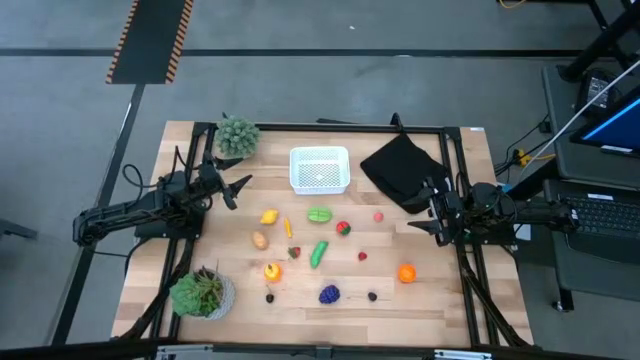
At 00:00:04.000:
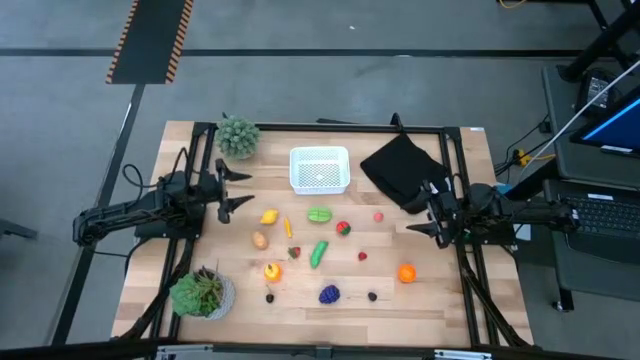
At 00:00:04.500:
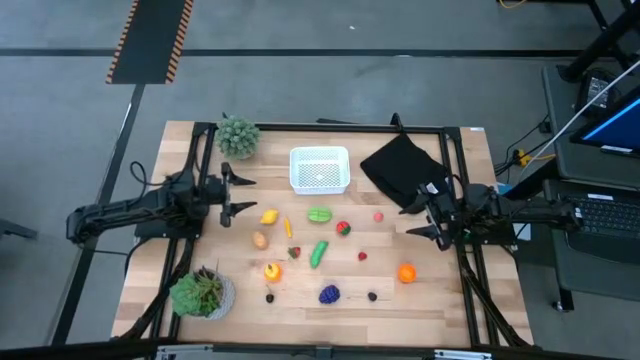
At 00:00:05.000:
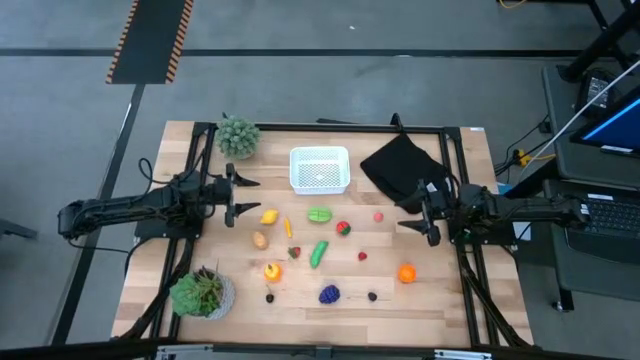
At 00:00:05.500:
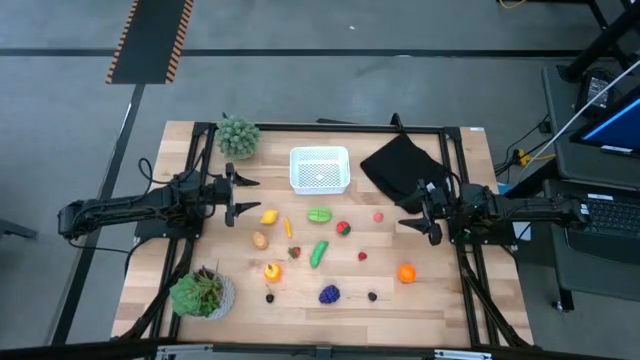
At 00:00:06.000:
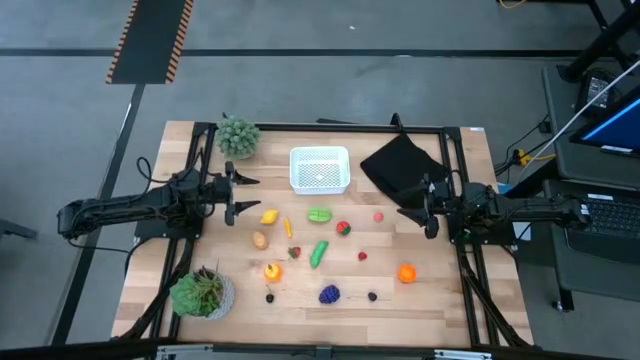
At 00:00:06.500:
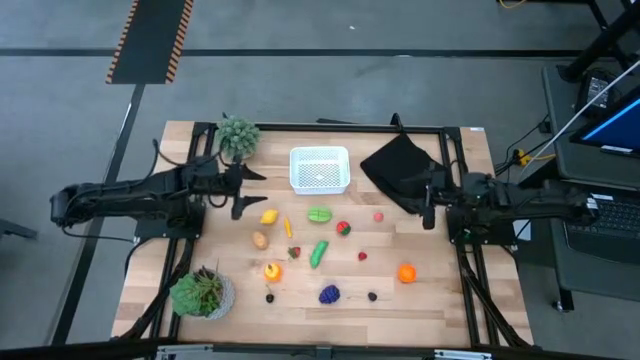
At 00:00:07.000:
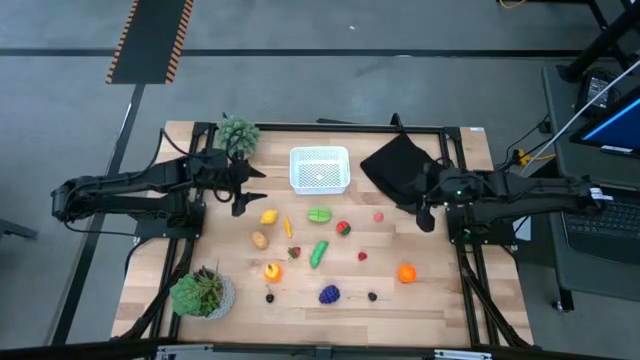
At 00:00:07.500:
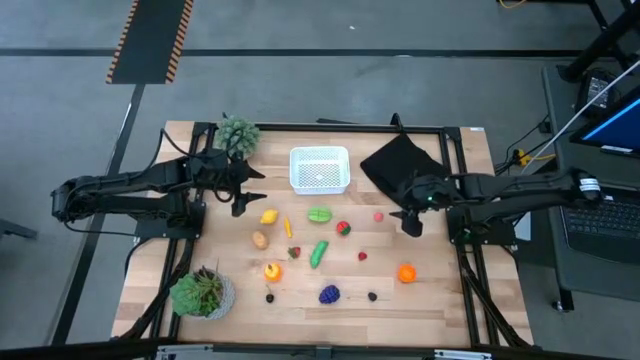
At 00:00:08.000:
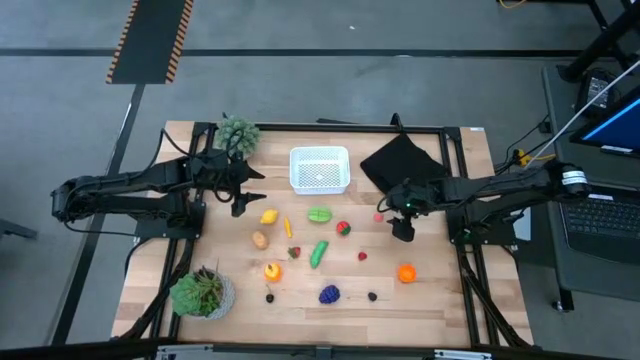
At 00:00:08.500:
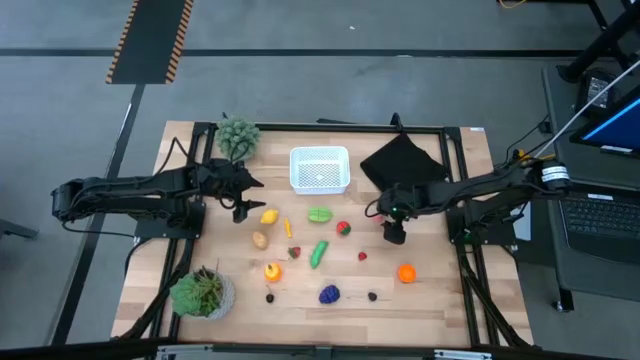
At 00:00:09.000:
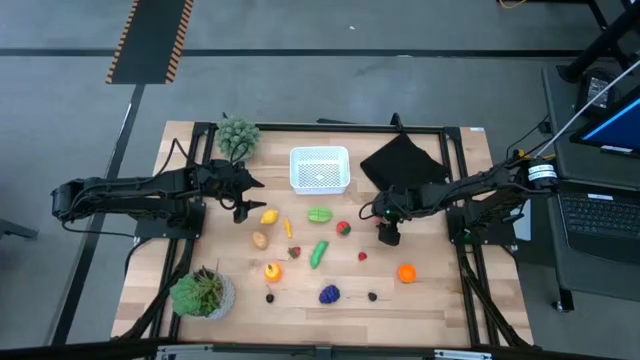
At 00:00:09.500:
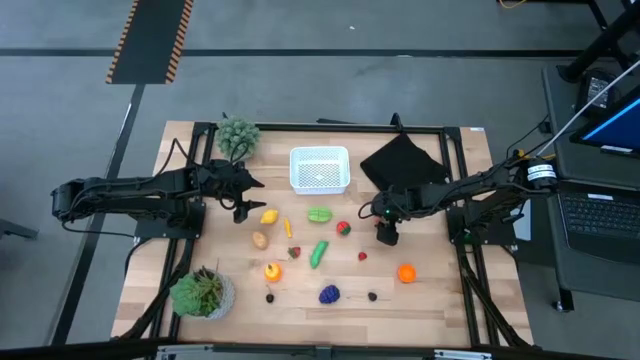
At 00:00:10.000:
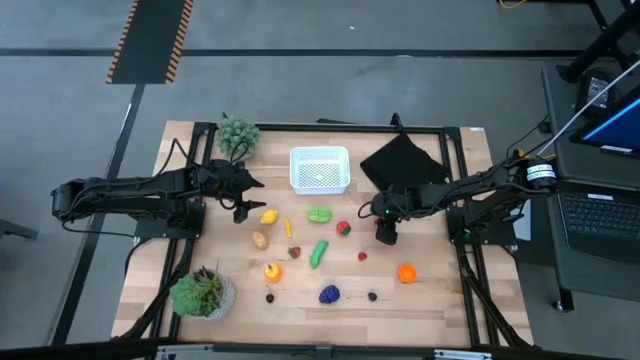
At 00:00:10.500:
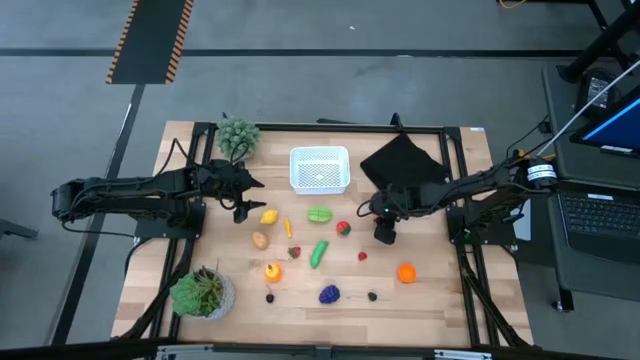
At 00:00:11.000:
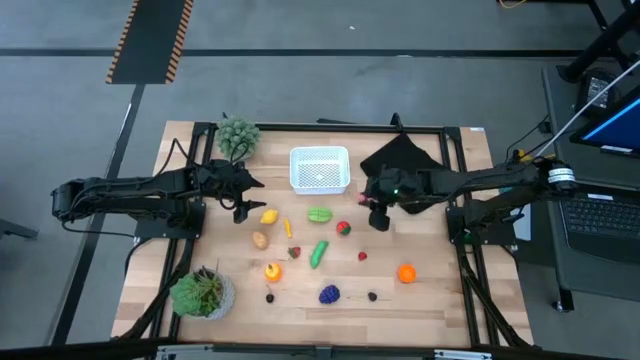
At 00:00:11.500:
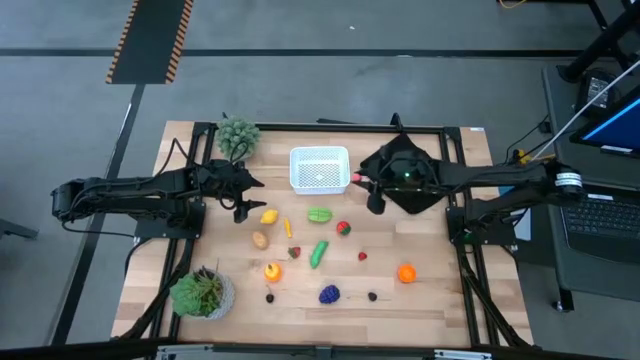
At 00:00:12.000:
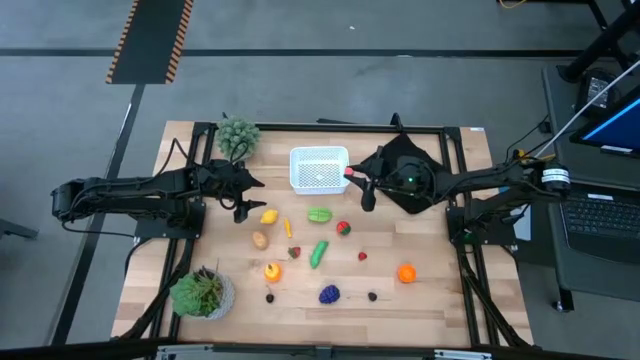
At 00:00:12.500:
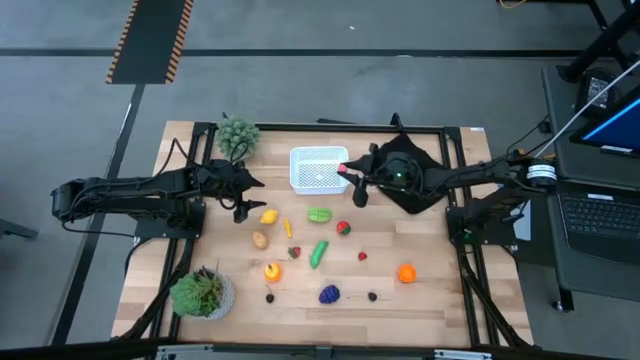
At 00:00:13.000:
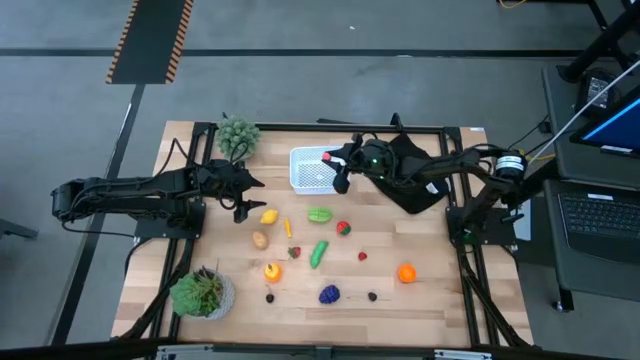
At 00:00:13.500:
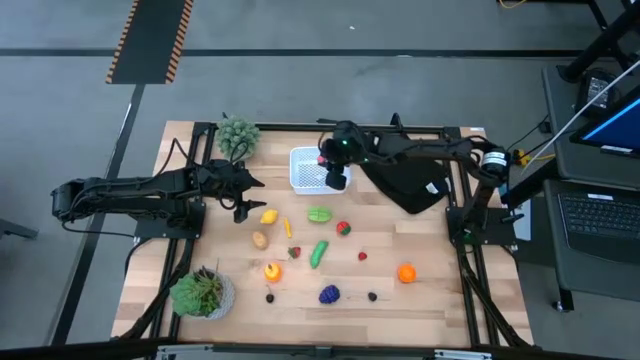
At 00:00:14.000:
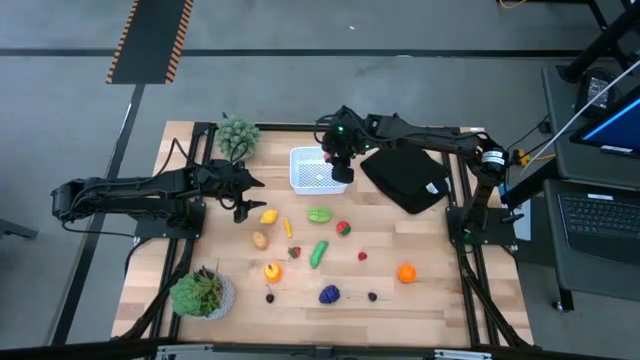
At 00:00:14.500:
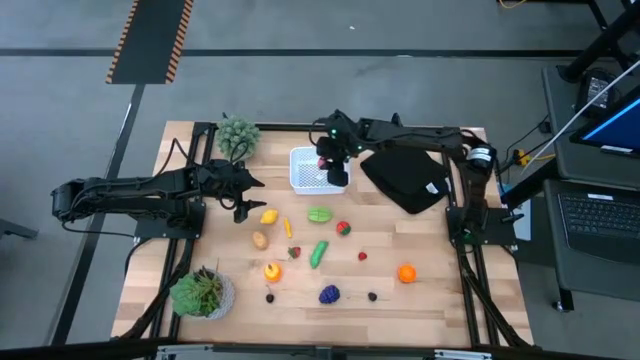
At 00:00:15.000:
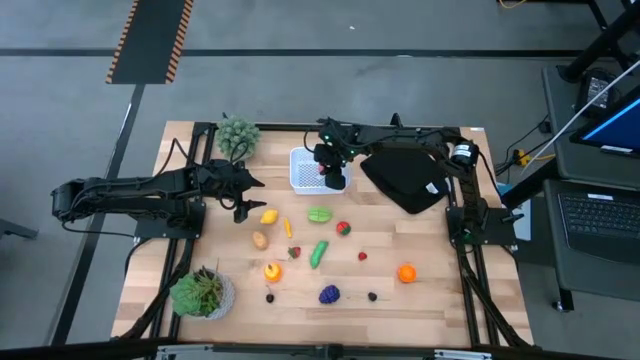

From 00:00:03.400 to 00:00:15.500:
Task: Pick and placing Produce into tupperware
Put the peach into the white bin

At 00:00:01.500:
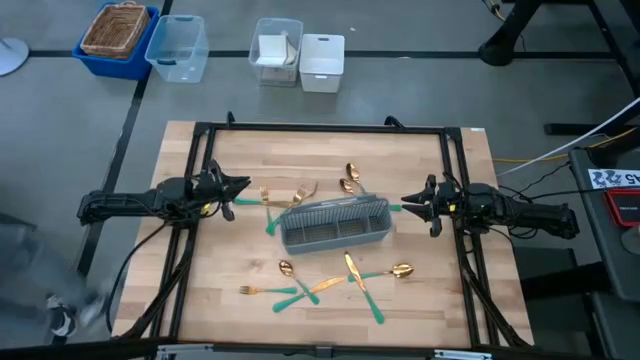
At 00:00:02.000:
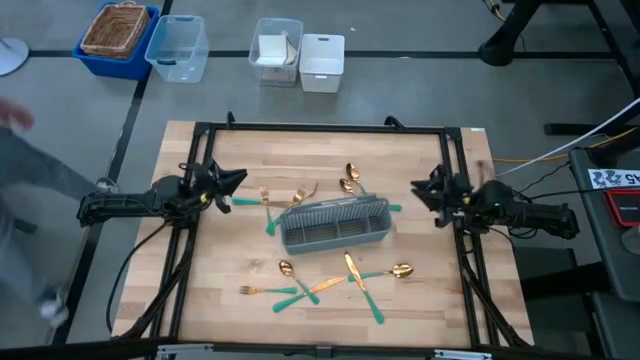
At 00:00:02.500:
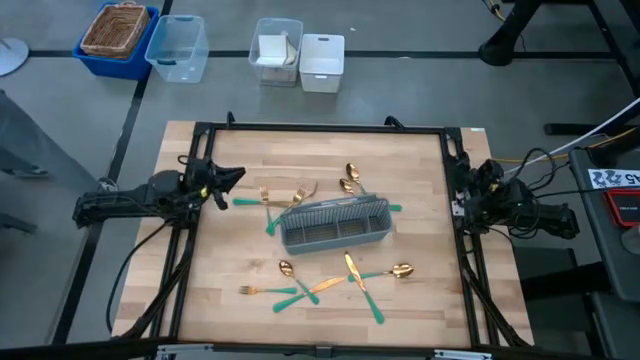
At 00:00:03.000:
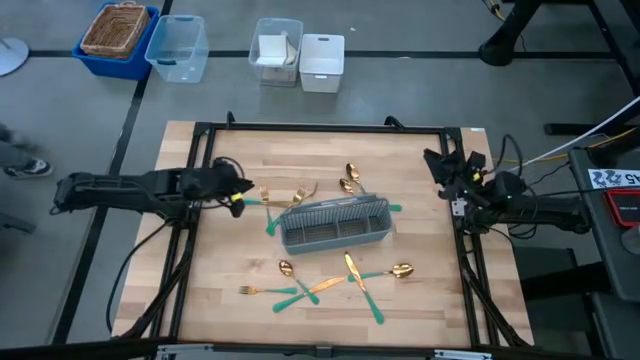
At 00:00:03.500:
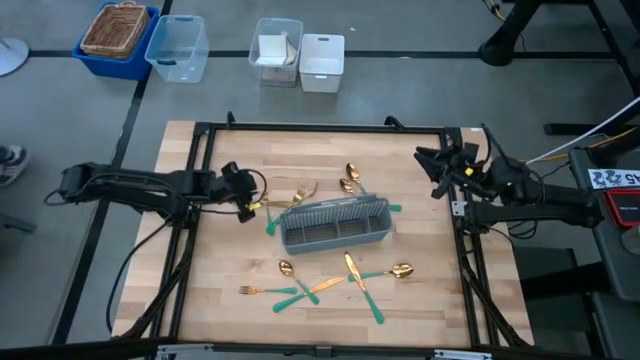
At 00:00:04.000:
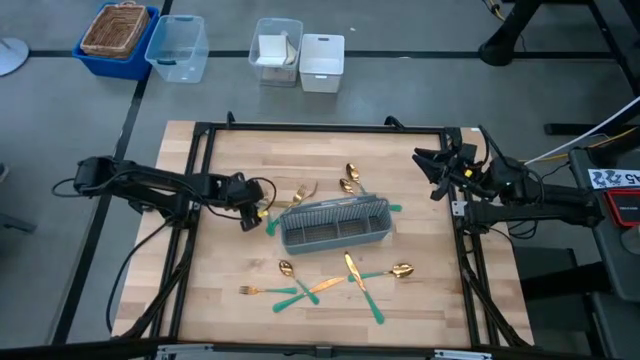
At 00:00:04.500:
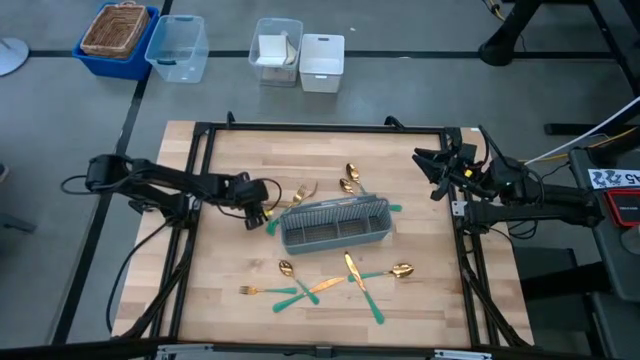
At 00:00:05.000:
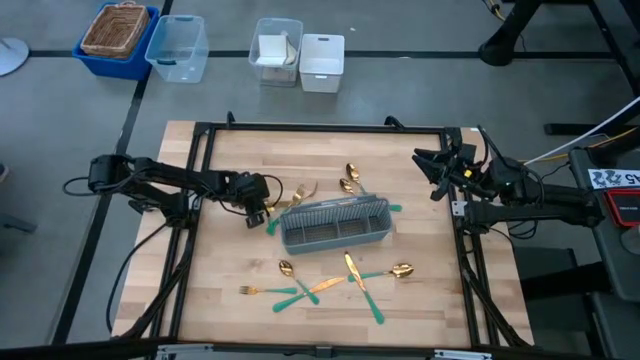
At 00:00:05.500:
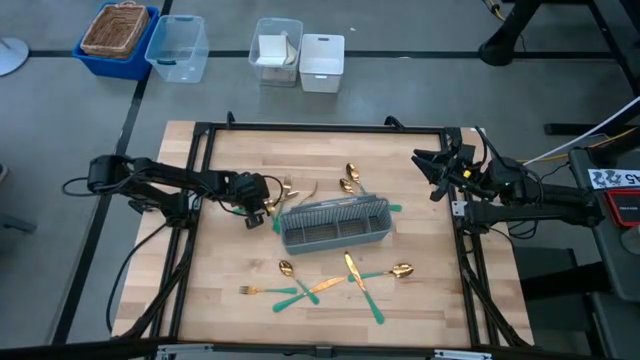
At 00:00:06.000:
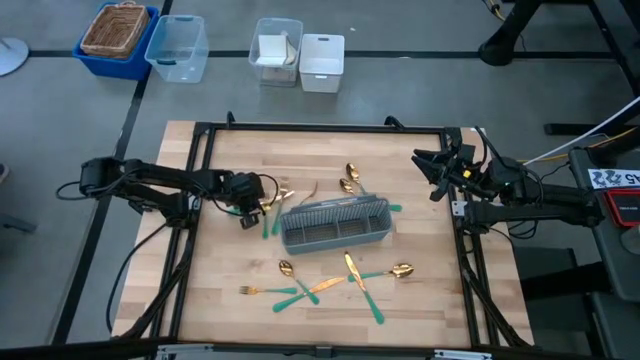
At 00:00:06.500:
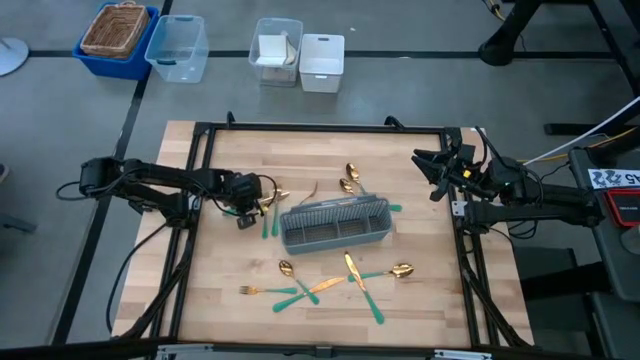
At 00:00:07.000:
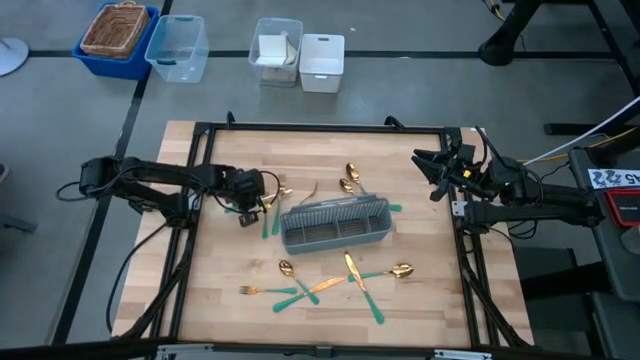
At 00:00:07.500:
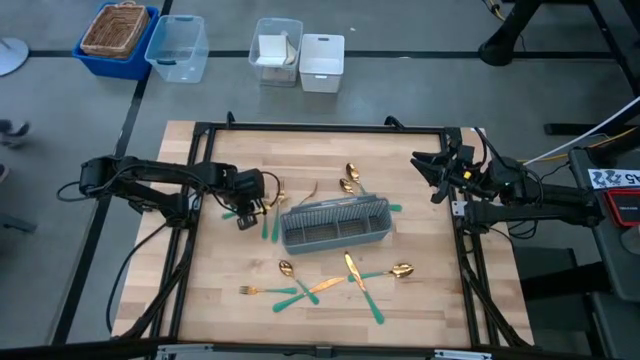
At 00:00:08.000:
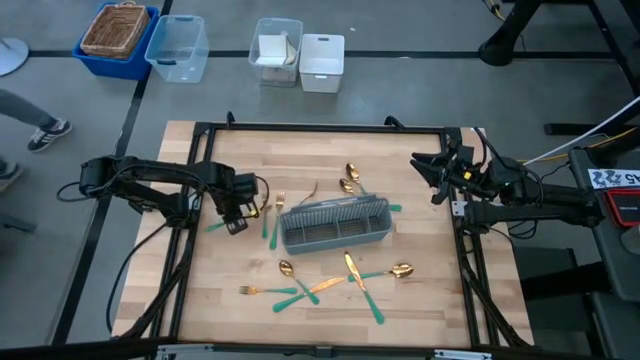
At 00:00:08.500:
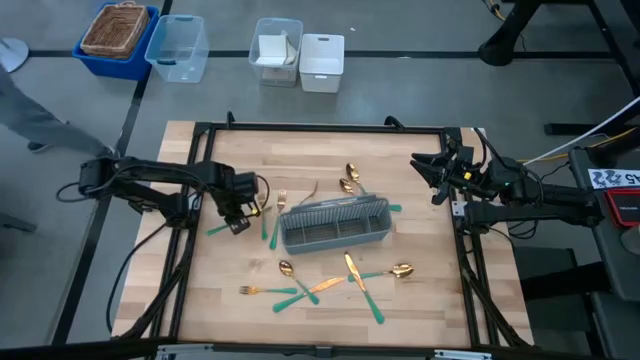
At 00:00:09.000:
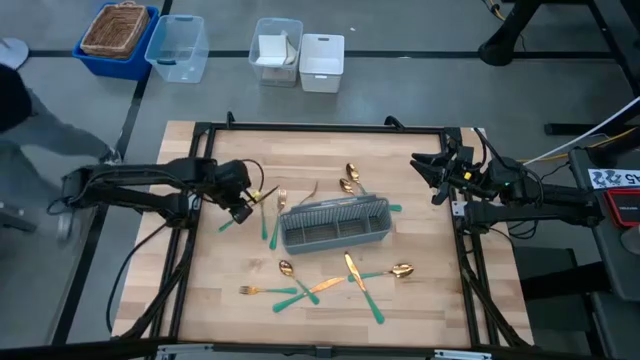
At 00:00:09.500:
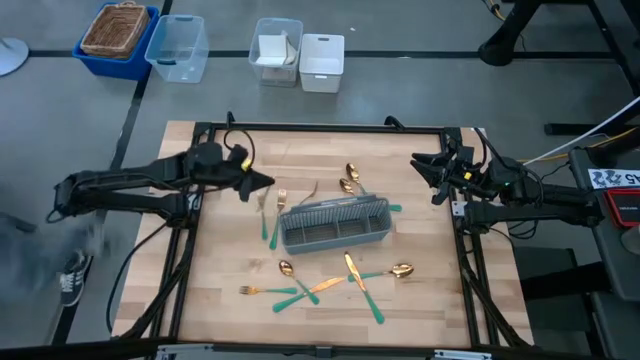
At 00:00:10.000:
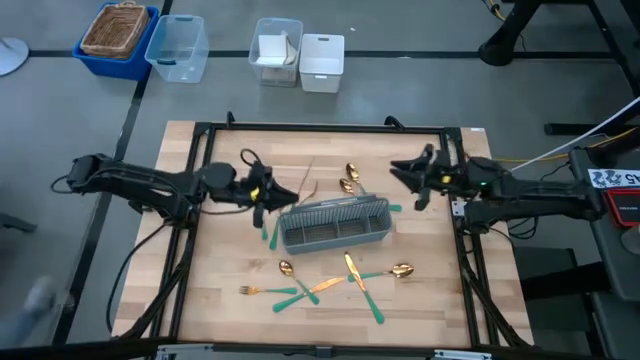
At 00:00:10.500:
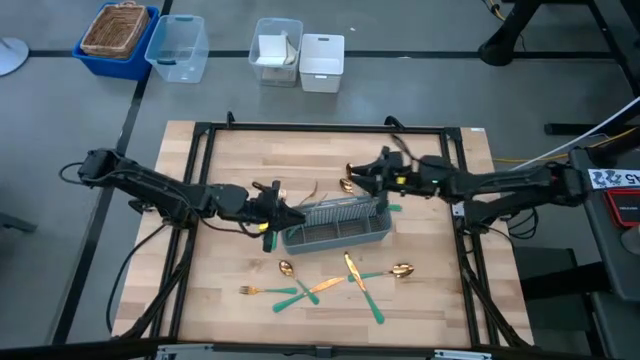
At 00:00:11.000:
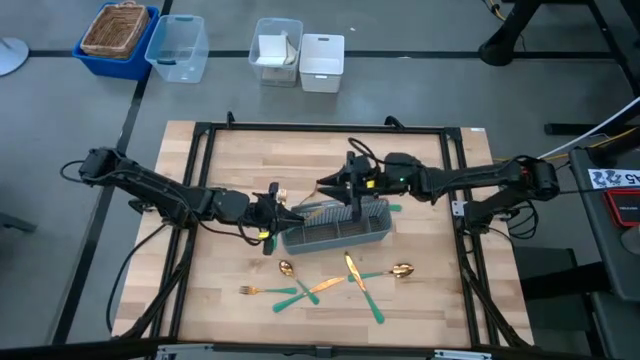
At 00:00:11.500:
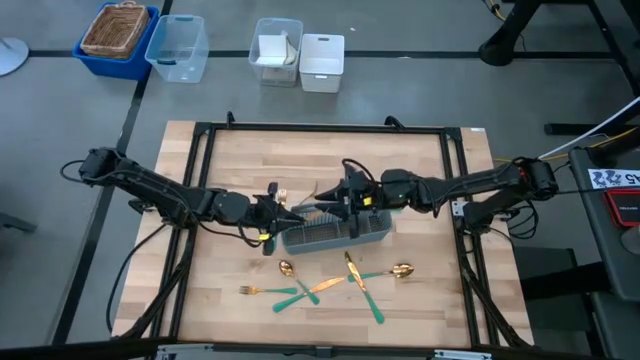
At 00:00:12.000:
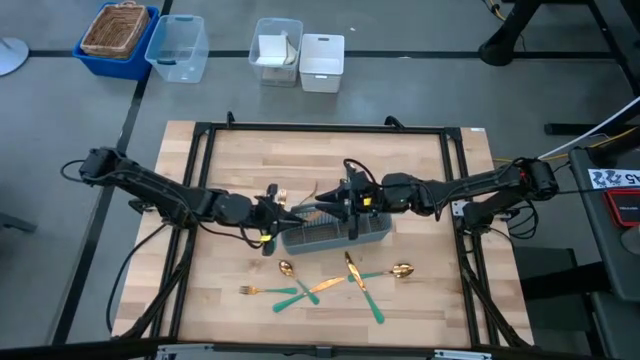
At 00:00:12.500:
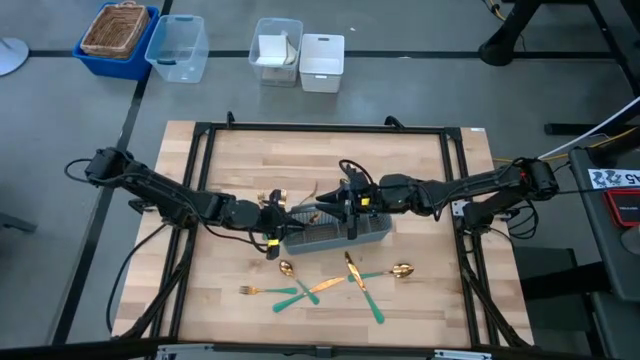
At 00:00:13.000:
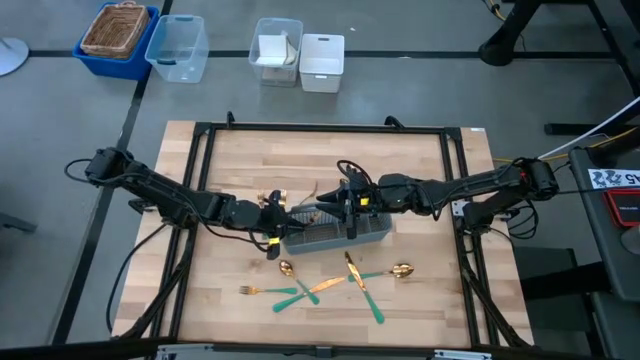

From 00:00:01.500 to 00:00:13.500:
Task: Sort silverware
Put the green knife into the gray utensil holder
